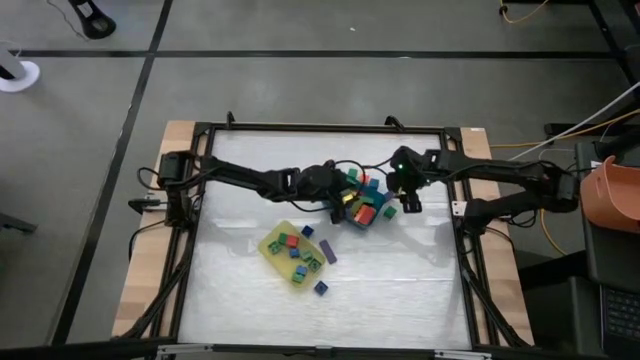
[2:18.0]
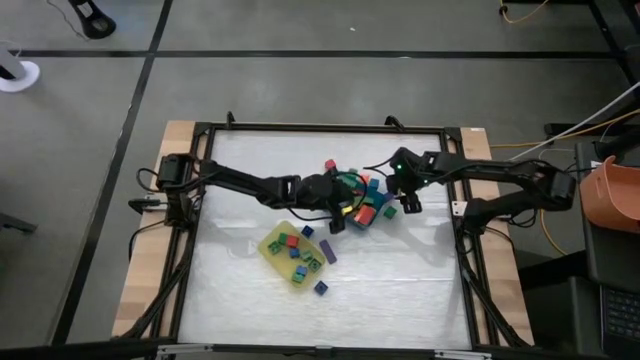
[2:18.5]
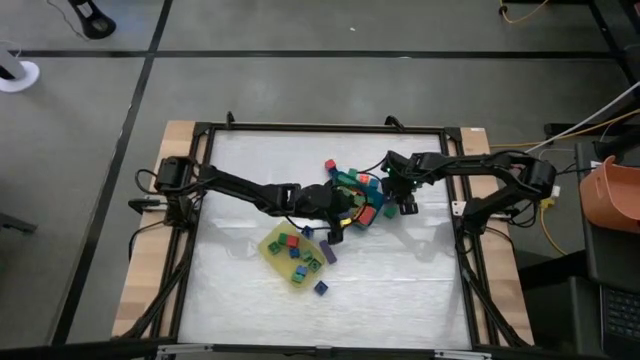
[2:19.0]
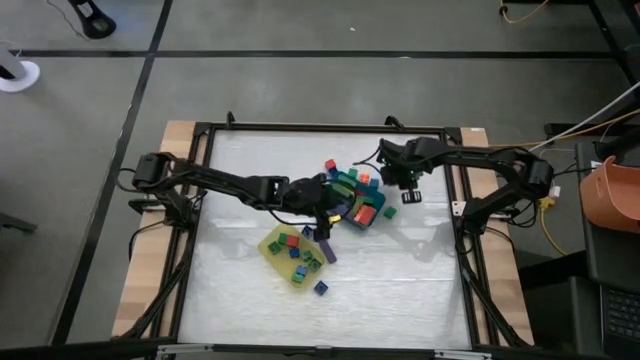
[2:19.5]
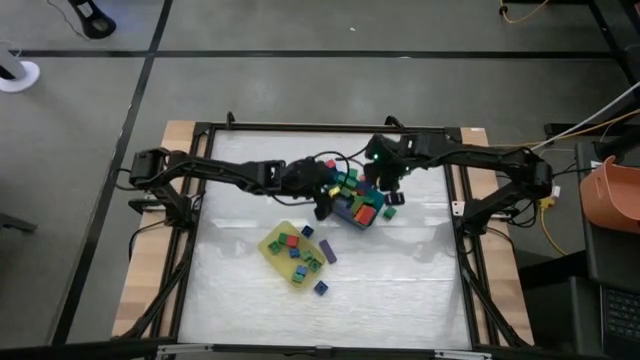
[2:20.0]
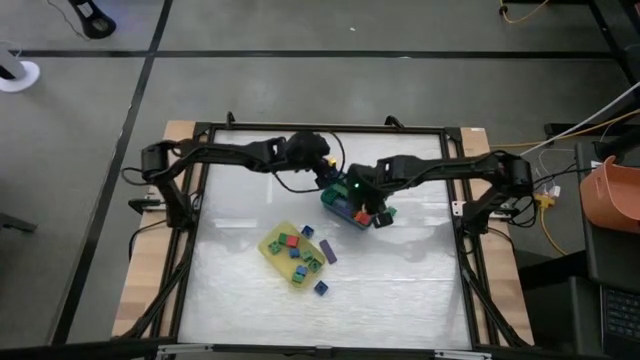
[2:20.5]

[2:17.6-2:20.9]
Task: Sort blocks by size
Put the large violet wooden block into the blue bin

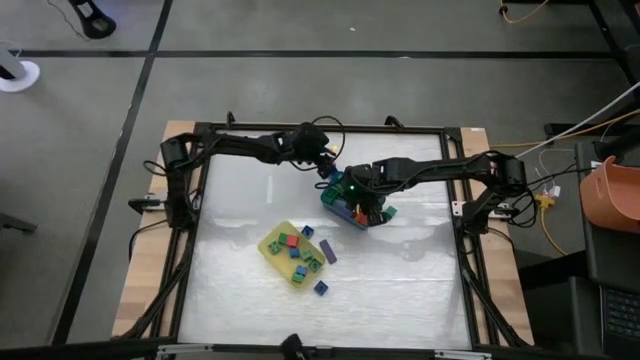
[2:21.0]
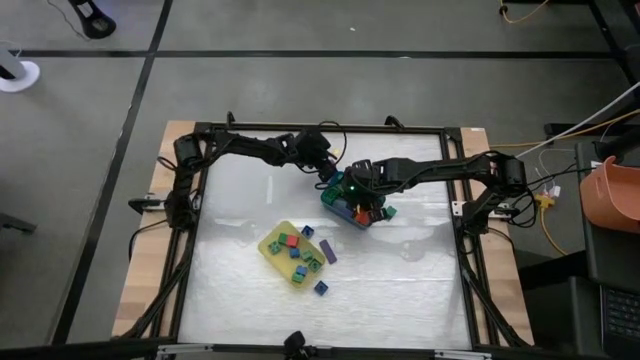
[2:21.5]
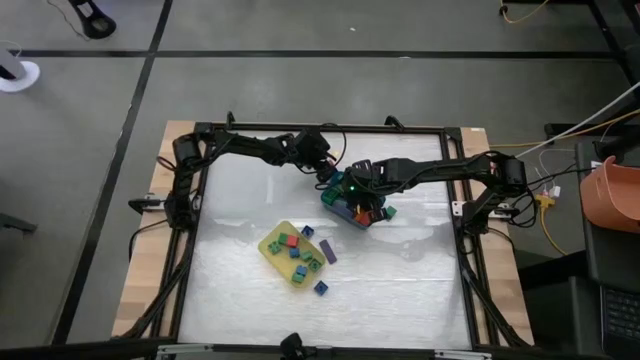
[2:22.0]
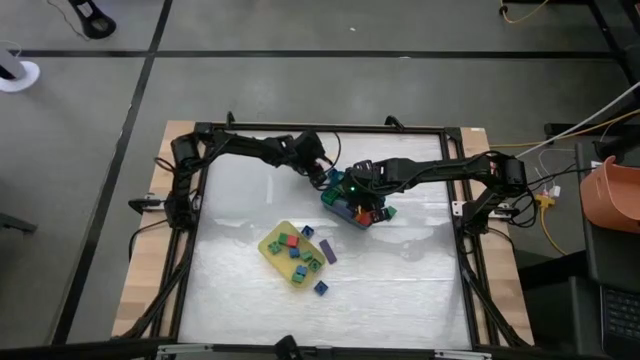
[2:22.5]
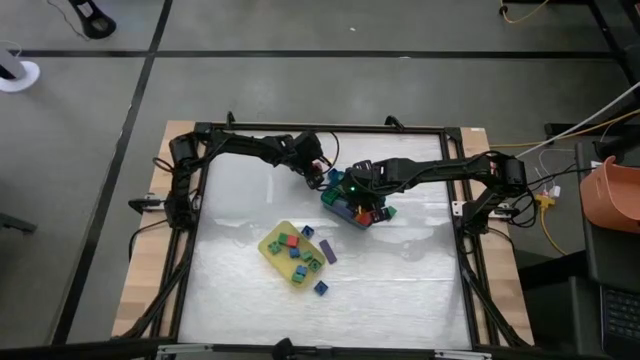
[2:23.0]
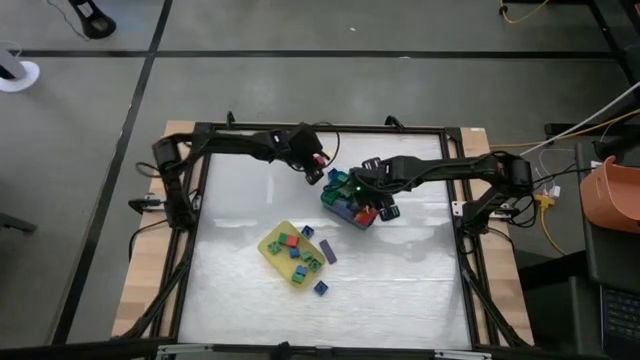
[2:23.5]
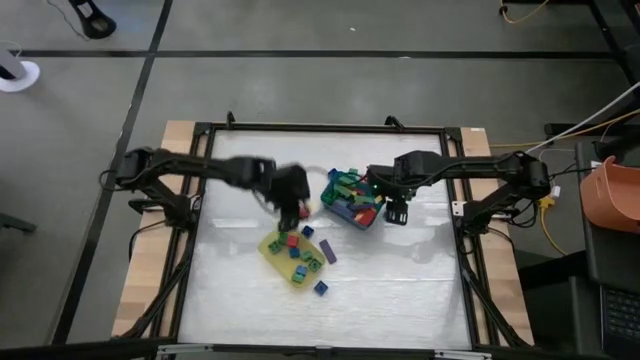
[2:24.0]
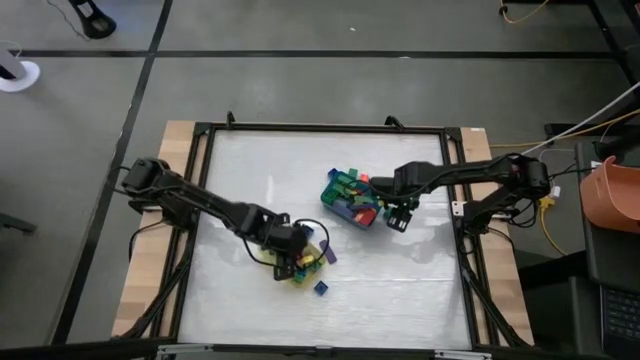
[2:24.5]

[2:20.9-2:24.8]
Put the small orange wooden block into the yellow bin

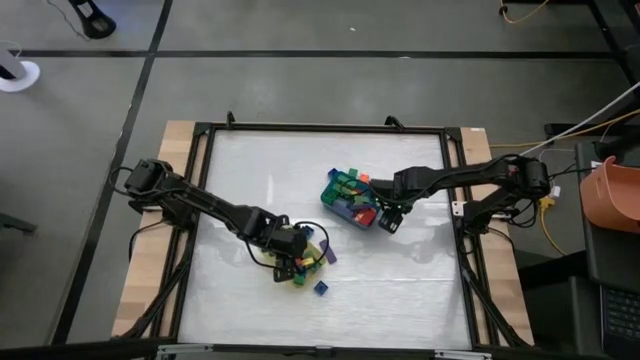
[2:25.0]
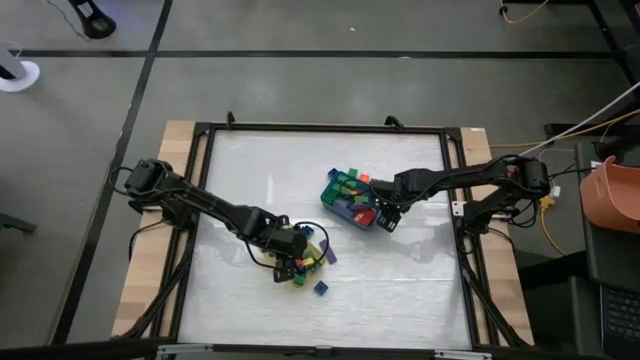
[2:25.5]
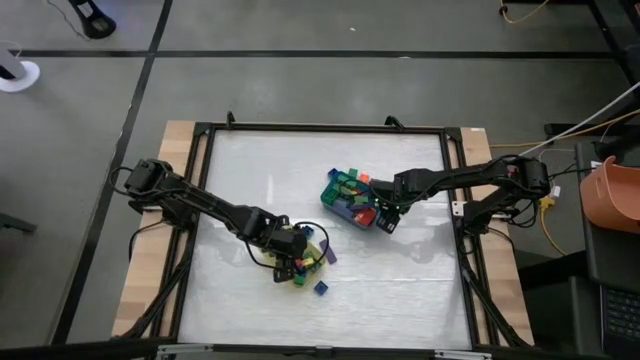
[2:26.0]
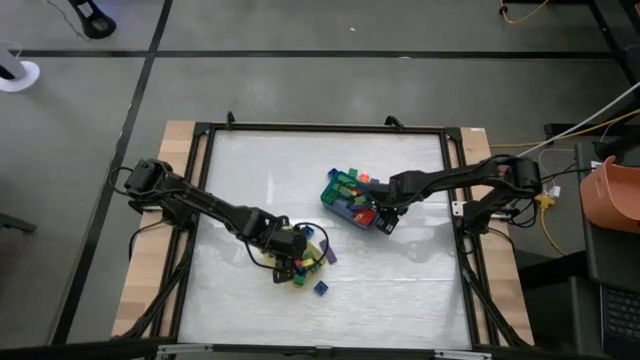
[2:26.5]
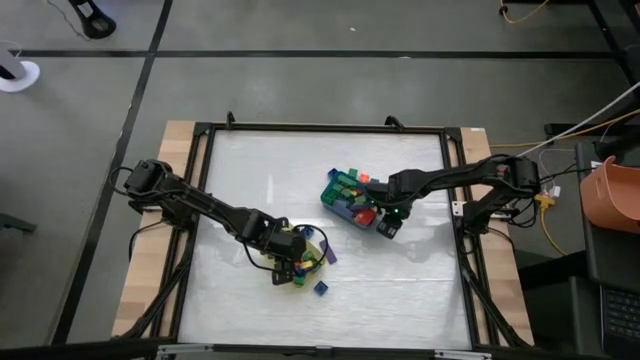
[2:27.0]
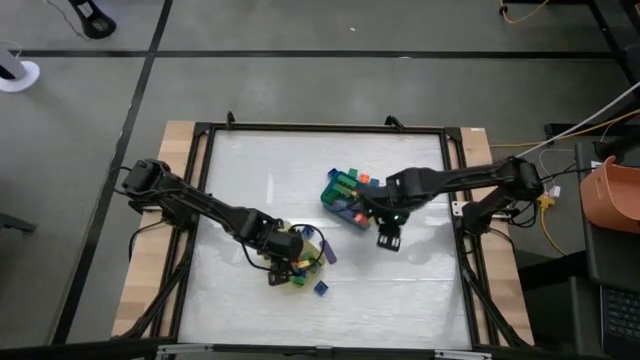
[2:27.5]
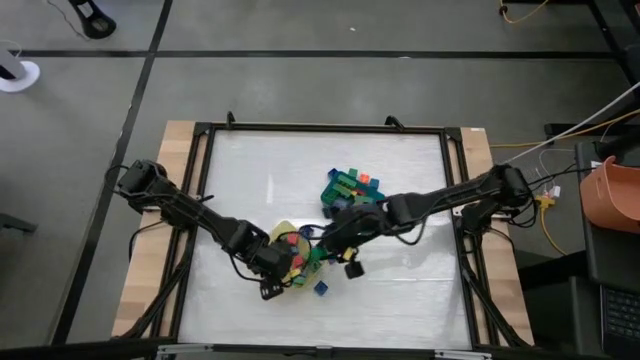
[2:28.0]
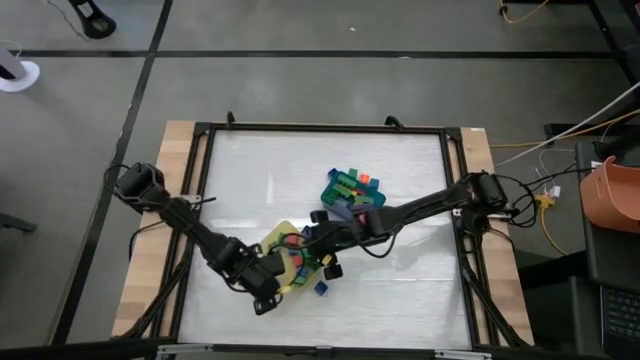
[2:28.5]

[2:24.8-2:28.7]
Put the small green wooden block into the yellow bin

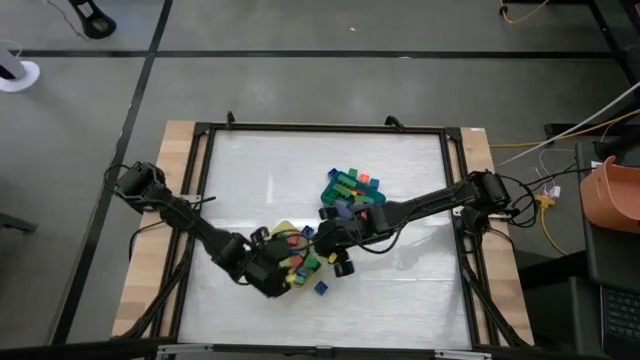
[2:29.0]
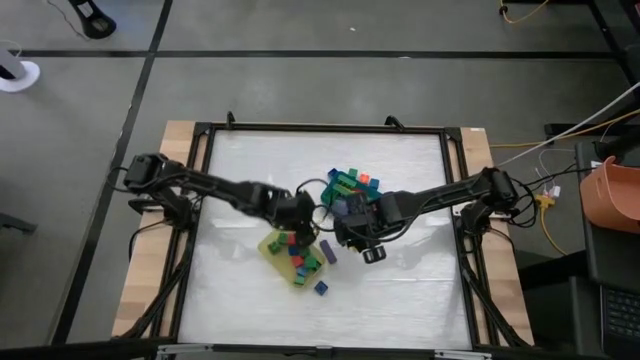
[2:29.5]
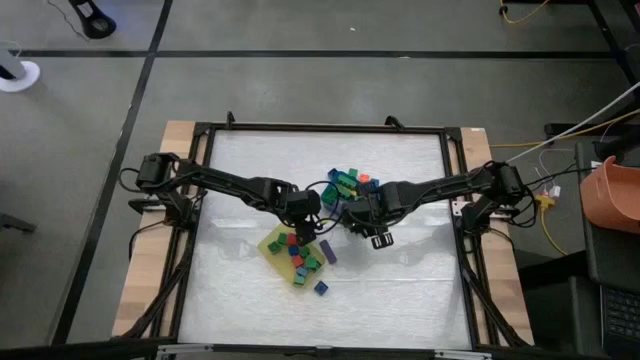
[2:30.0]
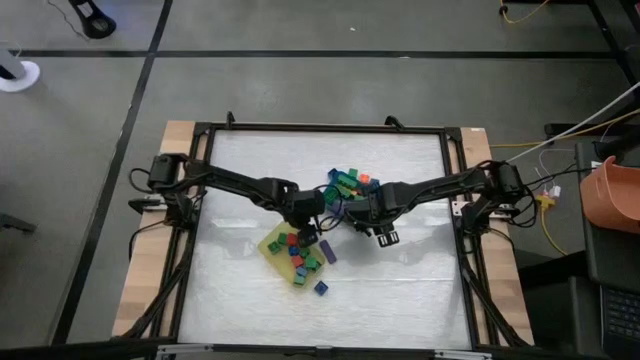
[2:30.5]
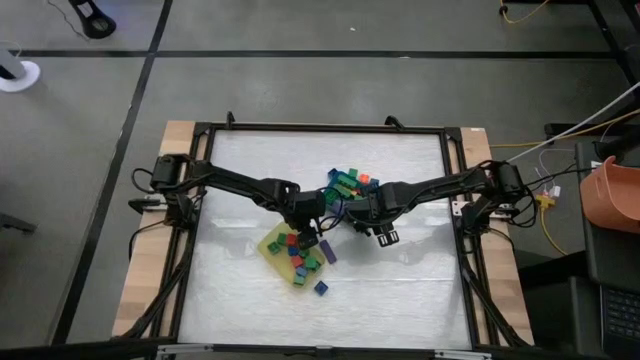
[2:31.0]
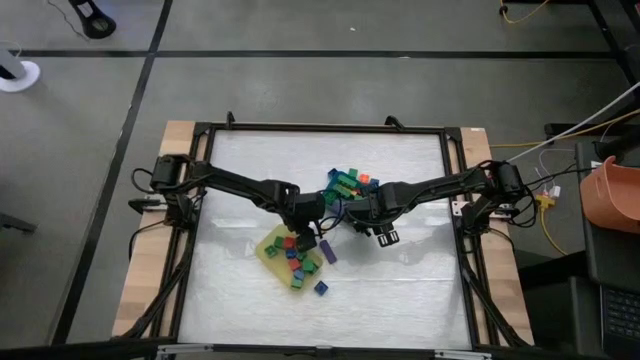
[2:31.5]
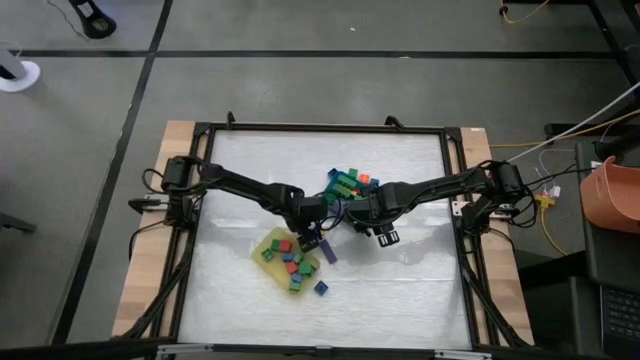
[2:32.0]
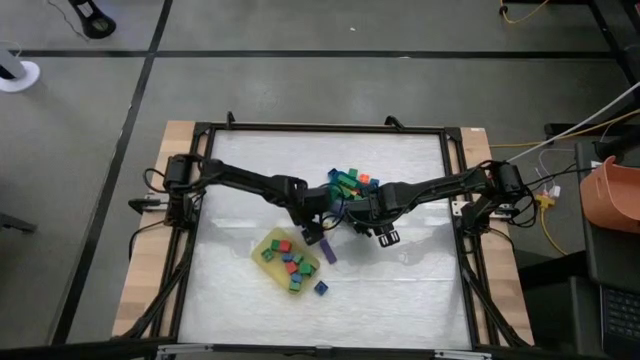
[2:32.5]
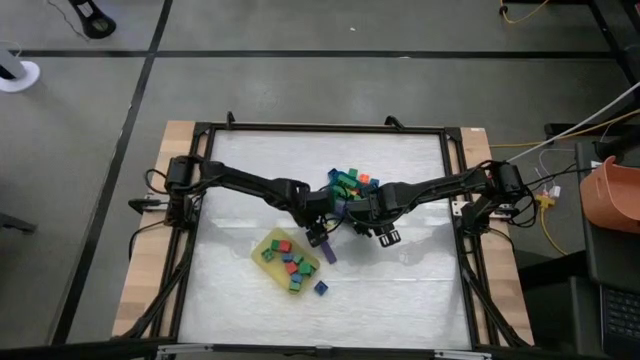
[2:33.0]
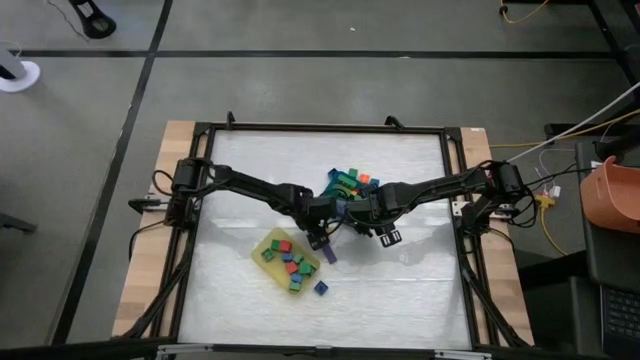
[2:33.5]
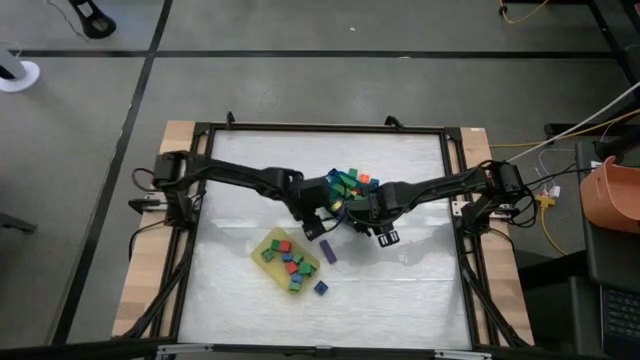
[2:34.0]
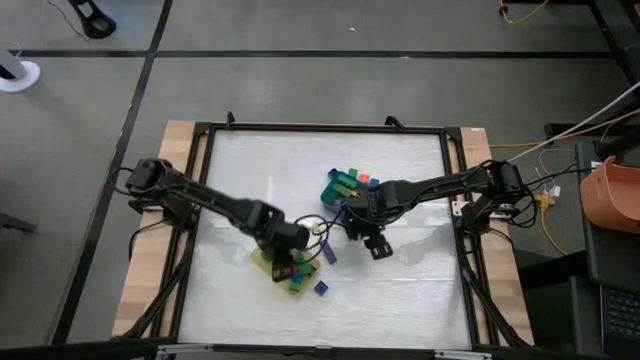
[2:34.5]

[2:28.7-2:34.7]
Put the small blue game piece into the yellow bin

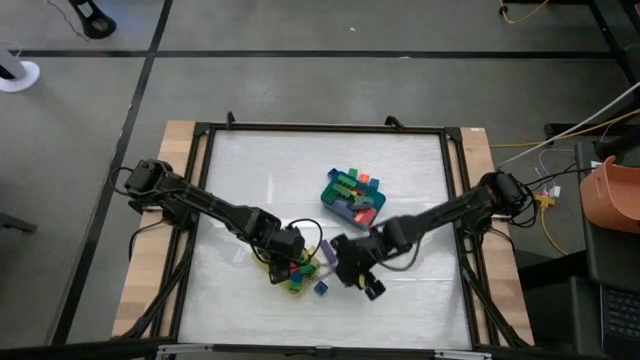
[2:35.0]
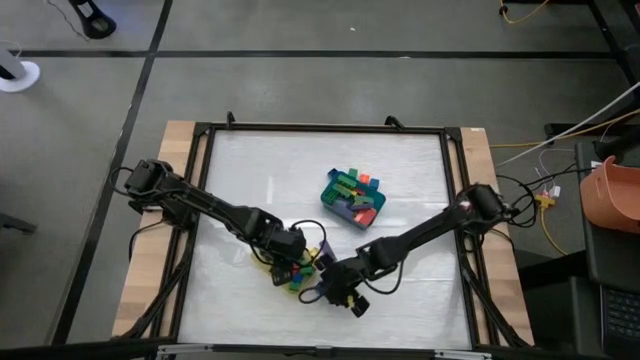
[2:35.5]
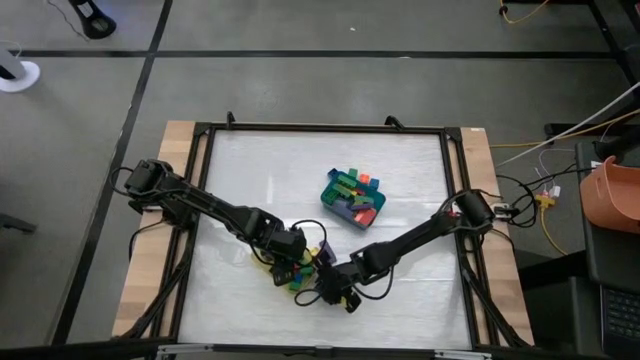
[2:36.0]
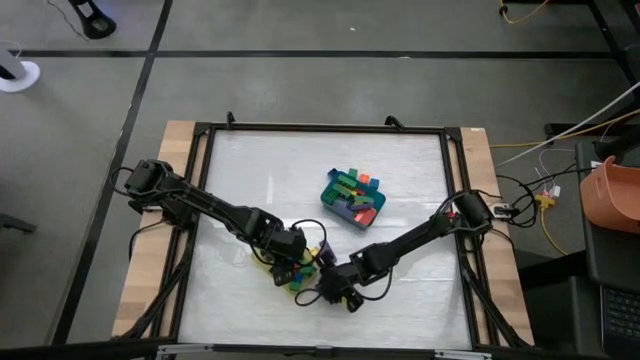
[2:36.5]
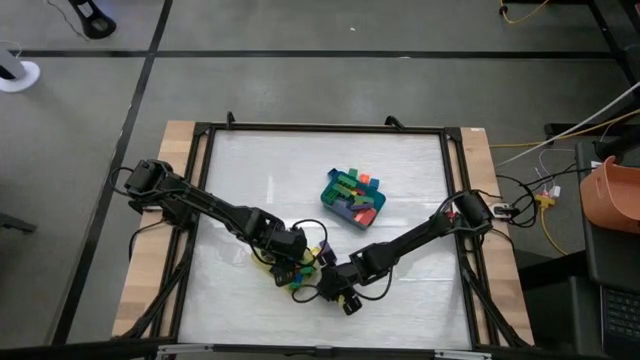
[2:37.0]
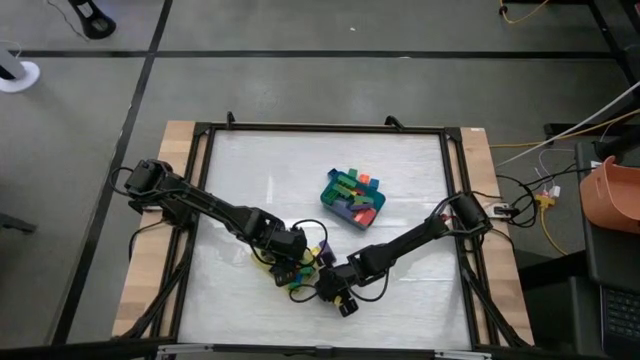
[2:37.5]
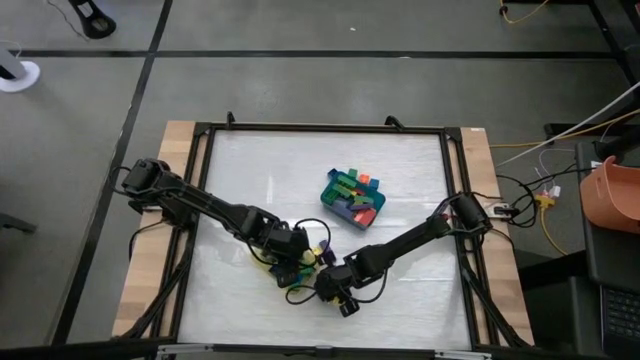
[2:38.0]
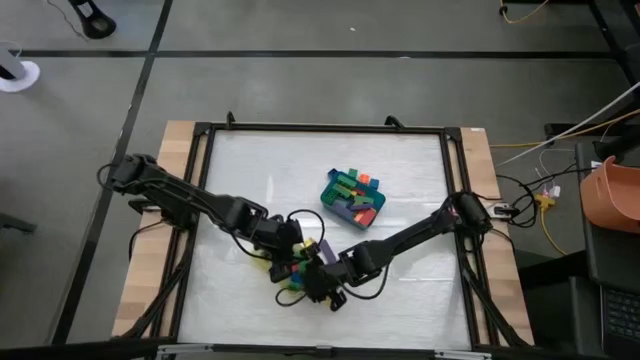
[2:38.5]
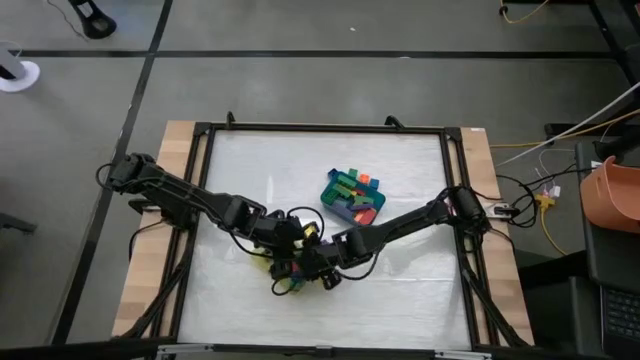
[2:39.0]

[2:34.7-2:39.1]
Put the small blue game piece into the yellow bin
